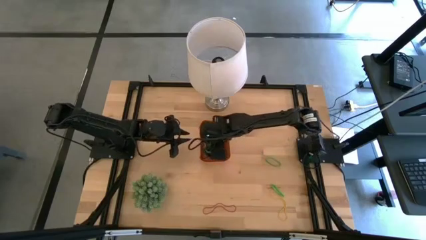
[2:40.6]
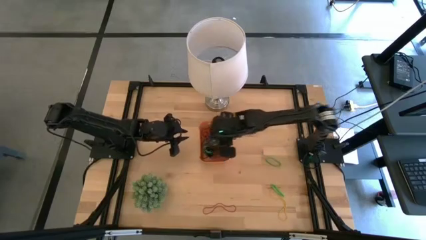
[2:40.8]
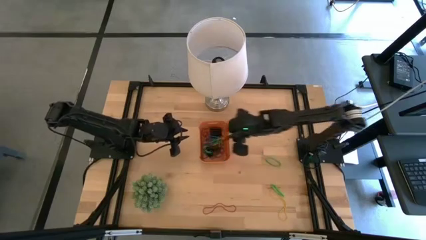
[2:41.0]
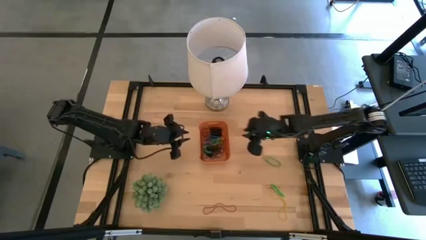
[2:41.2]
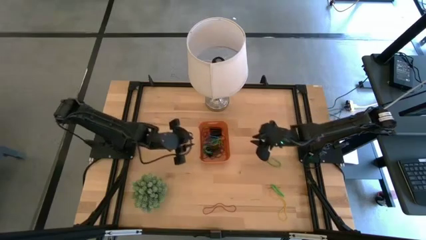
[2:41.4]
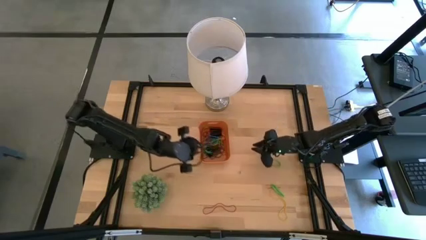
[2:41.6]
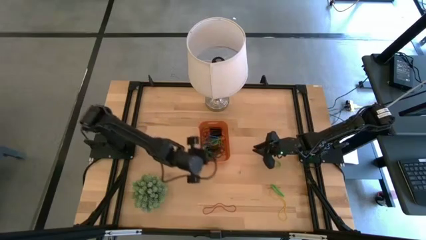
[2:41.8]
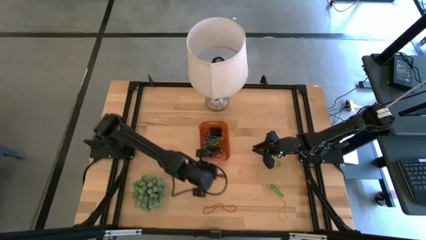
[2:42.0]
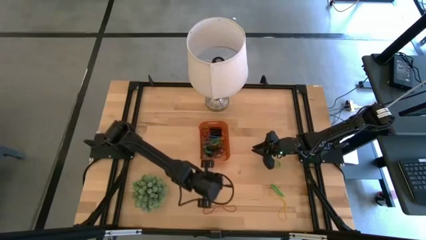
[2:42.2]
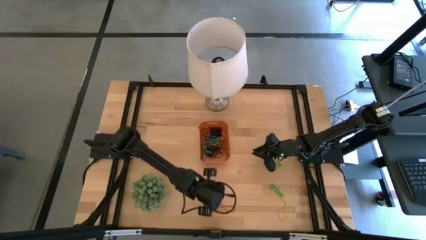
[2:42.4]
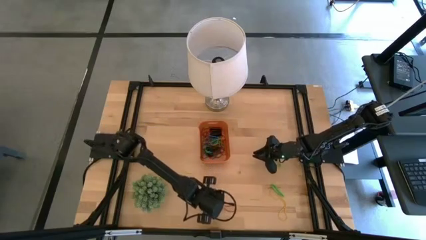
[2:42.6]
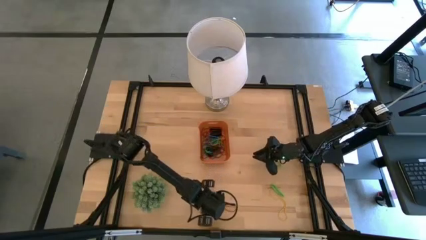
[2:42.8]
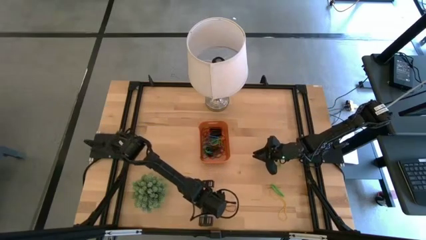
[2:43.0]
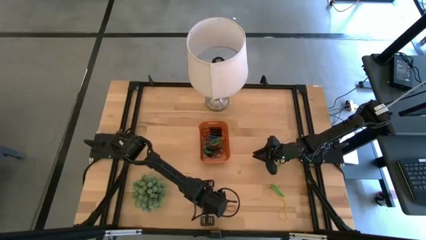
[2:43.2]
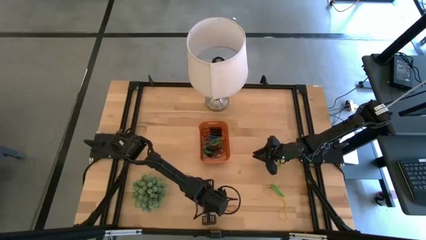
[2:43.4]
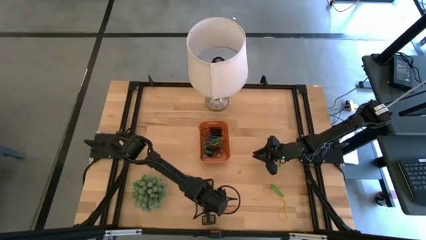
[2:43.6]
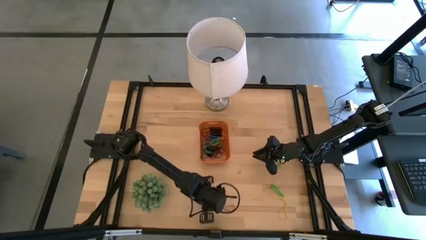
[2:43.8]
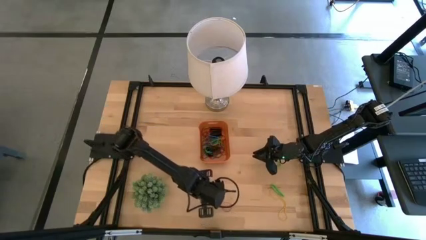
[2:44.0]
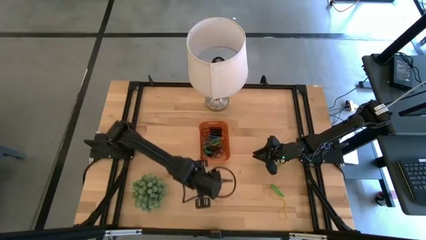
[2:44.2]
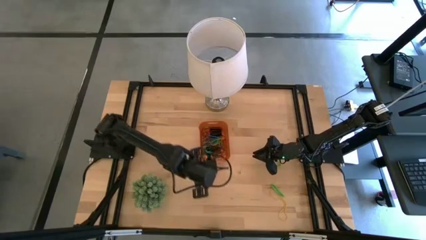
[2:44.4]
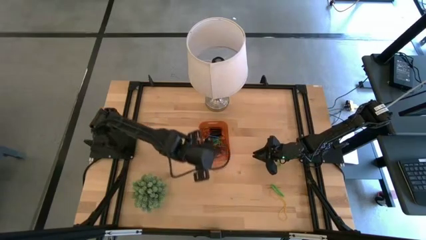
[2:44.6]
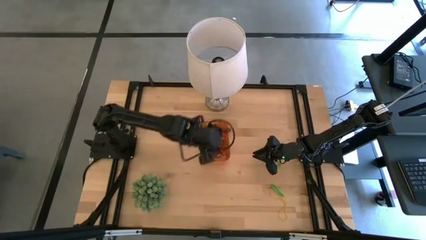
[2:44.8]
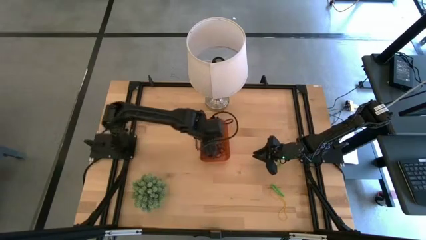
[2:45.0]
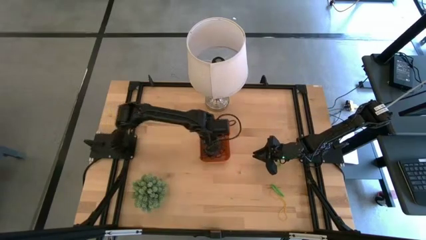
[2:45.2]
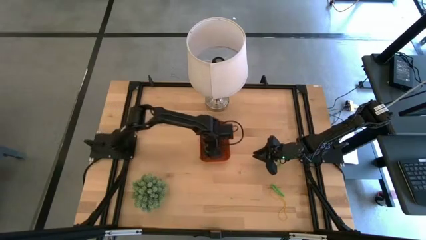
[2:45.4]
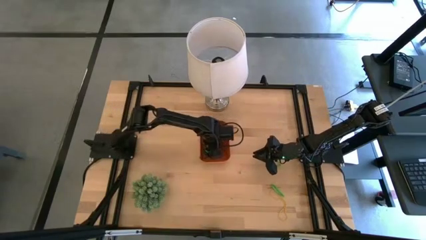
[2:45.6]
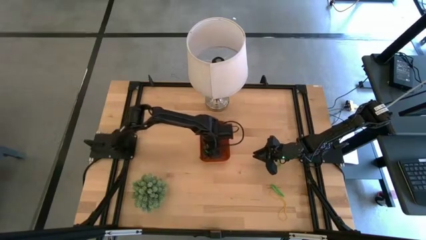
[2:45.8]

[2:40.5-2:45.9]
Task: Pick and place rubber bands into bin
Put the red rubber band into the orange bin

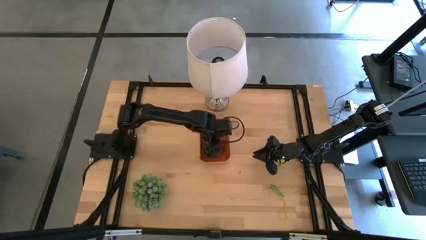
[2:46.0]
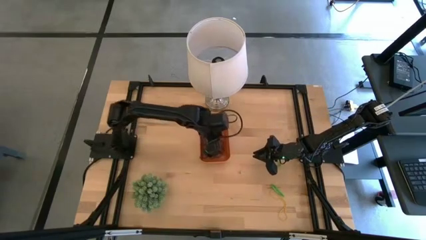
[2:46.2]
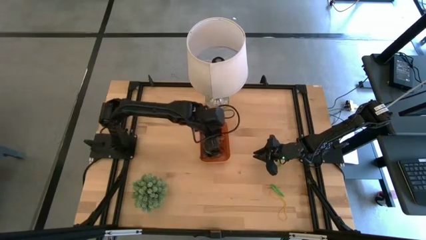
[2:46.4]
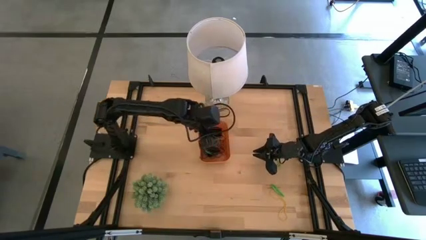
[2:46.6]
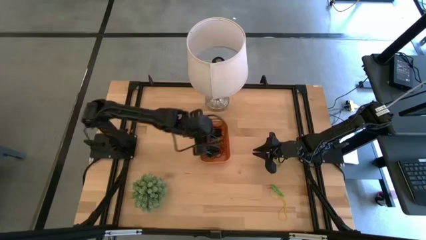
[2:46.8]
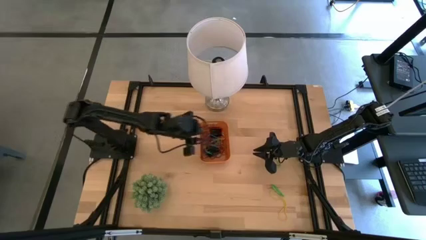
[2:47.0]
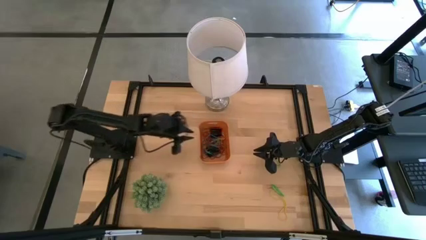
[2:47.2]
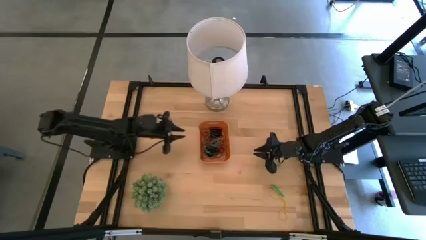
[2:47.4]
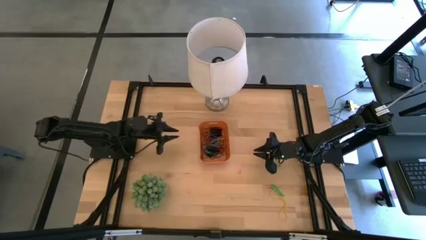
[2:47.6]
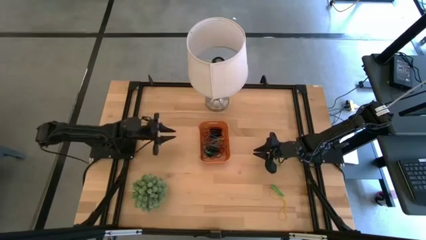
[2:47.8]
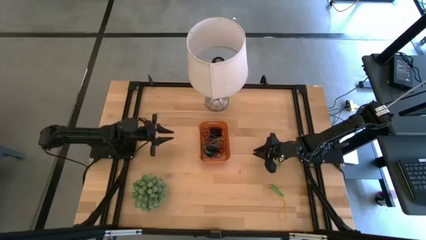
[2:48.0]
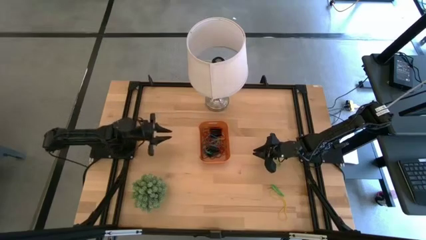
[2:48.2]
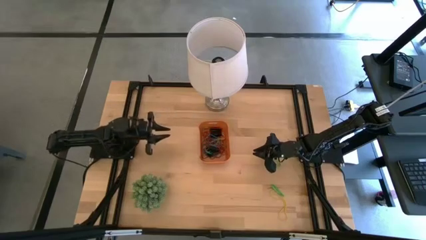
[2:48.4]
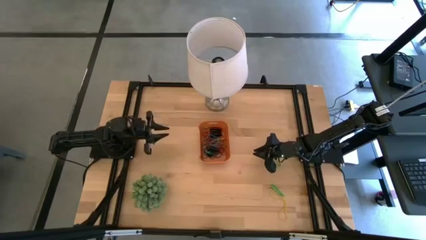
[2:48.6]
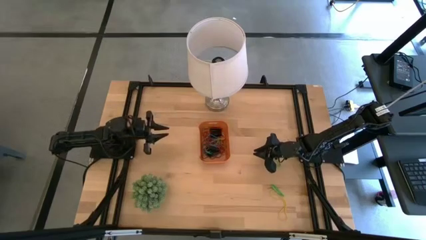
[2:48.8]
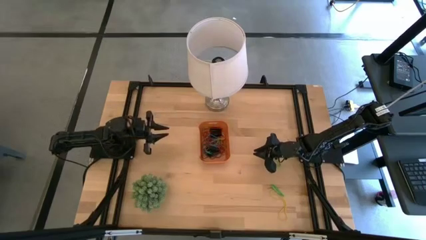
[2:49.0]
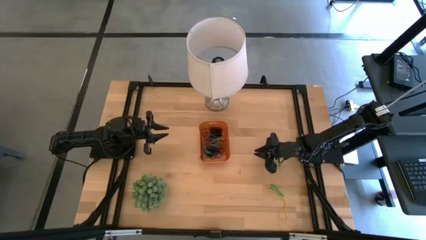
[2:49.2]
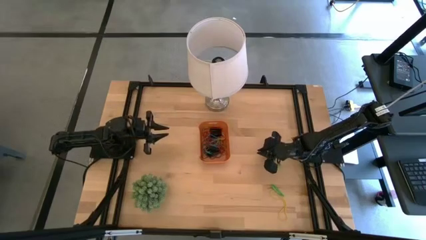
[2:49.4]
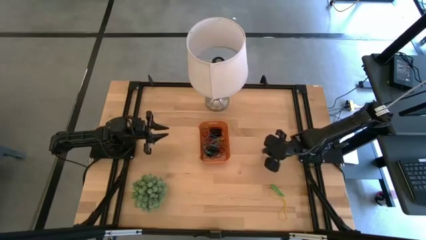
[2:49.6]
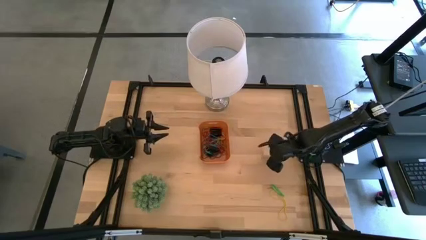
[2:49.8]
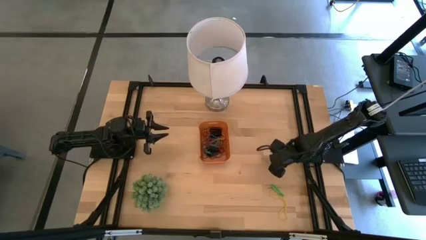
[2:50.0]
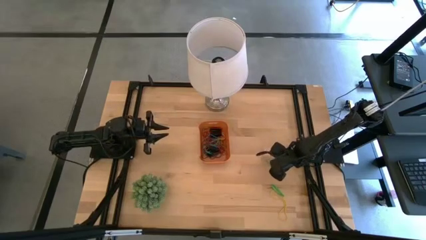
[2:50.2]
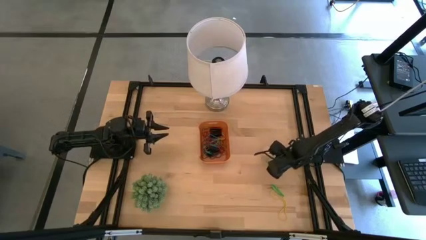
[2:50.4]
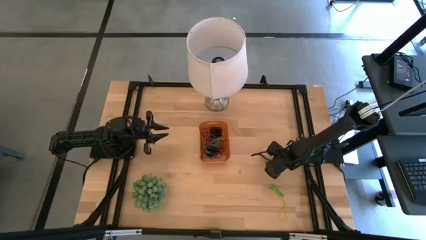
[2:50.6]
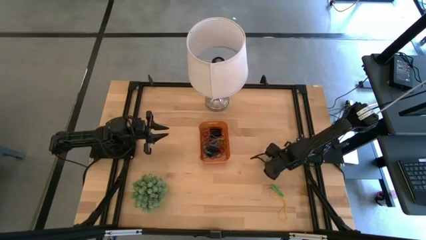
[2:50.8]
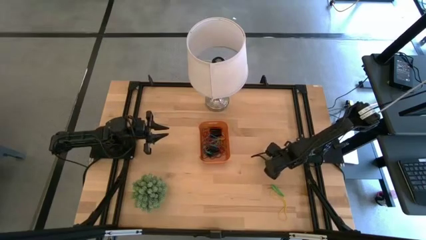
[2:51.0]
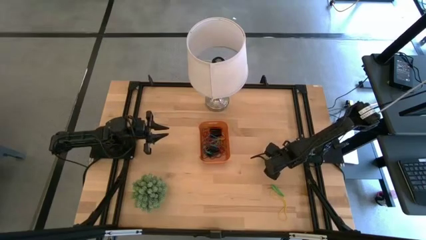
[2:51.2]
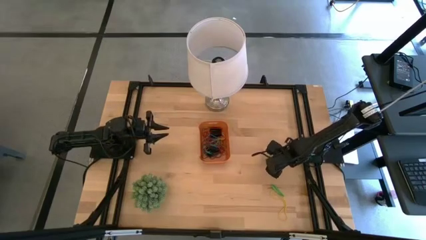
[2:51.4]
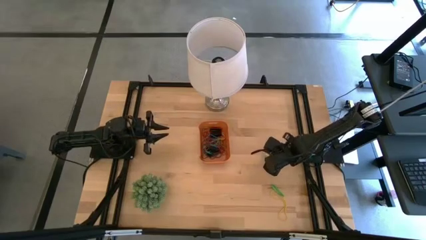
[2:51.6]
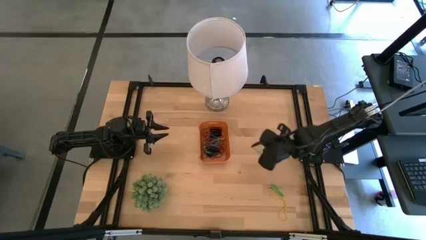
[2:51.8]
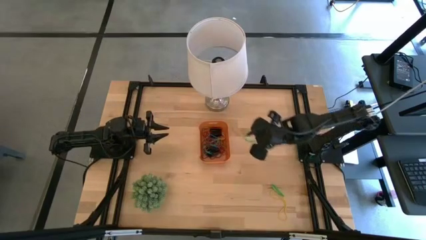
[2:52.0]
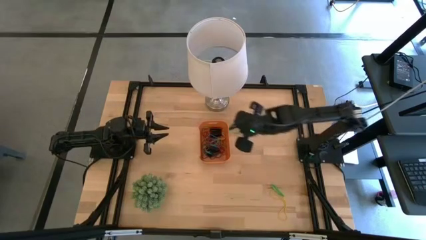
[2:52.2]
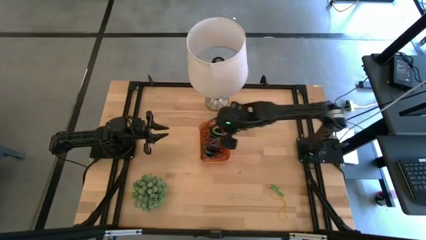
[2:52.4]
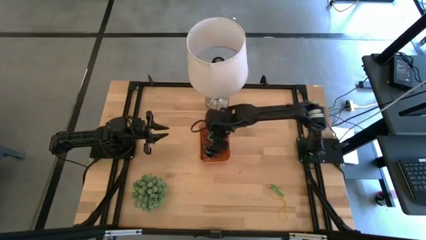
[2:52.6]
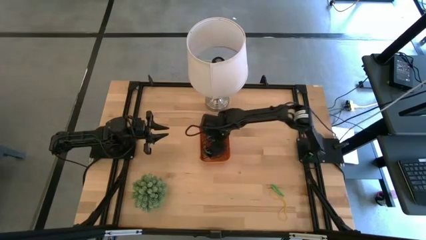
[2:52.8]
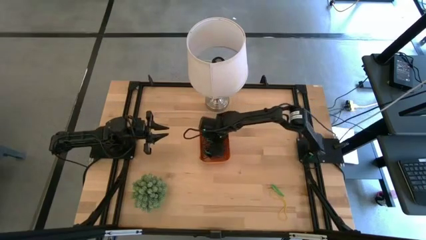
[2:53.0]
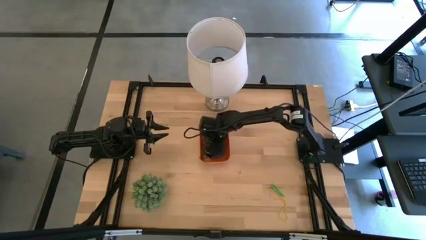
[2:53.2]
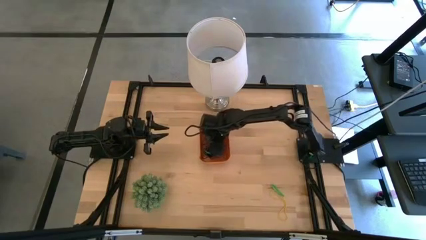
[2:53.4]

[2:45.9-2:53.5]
Put the green rubber band into the orange bin

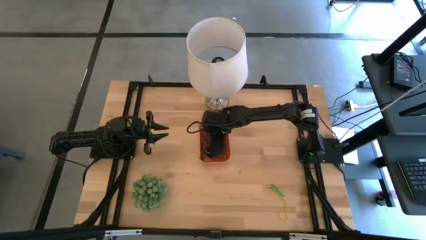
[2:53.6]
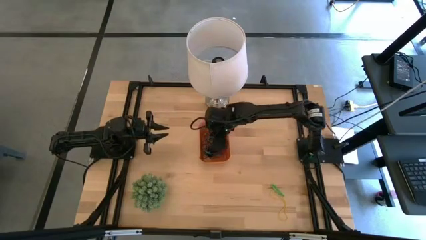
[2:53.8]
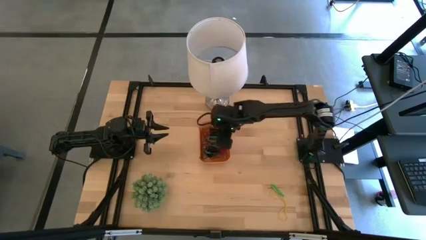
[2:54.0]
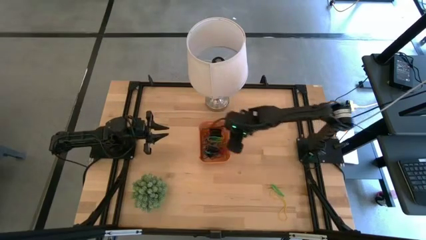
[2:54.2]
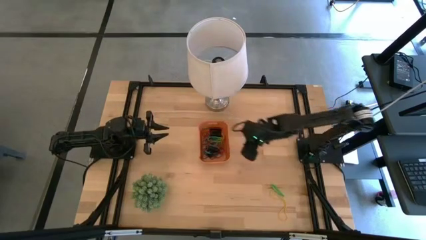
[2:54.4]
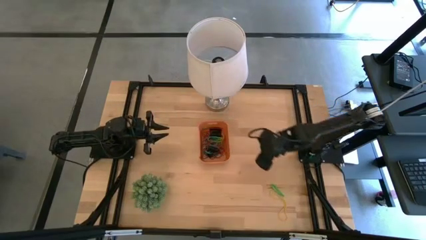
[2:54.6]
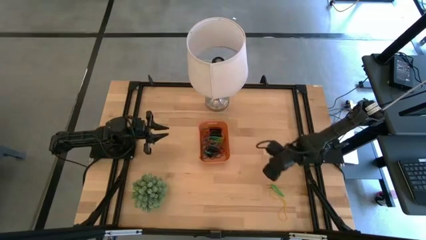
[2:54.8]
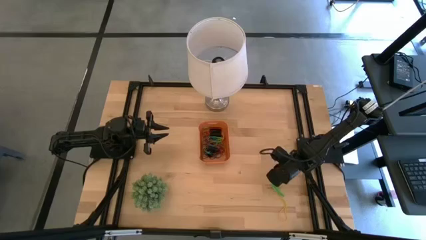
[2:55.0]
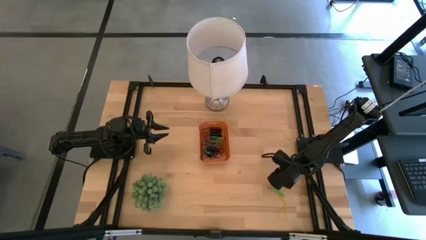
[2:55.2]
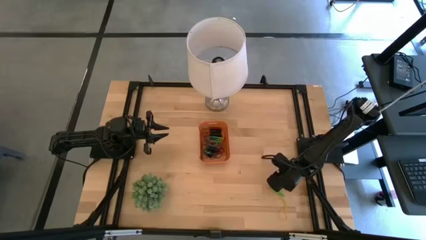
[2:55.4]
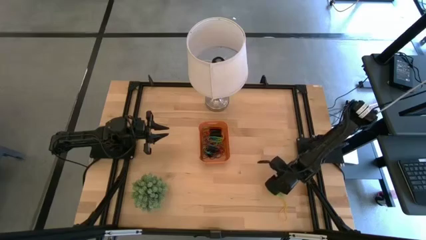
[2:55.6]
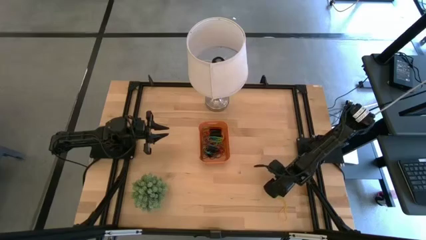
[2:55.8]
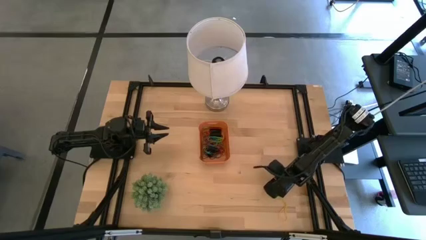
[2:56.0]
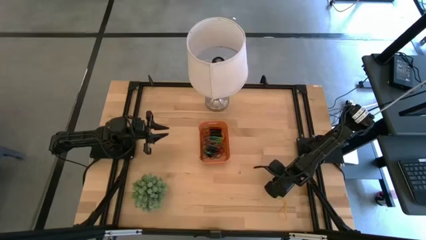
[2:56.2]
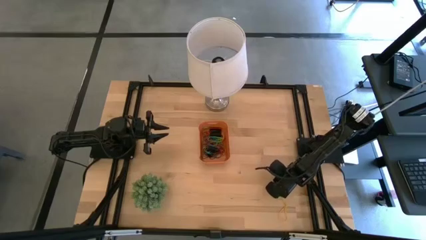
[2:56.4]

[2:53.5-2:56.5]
Put the green rubber band into the orange bin

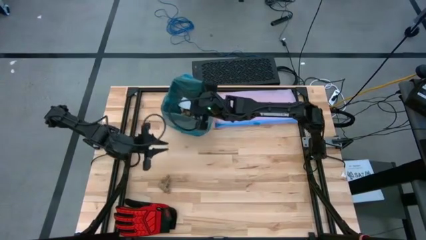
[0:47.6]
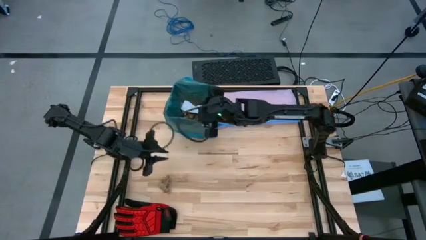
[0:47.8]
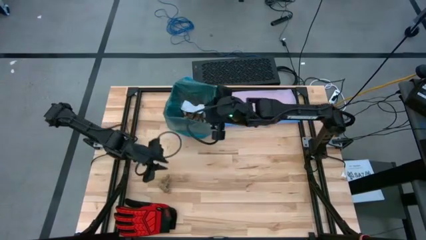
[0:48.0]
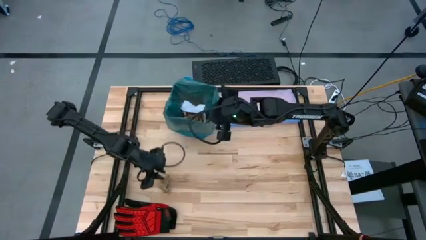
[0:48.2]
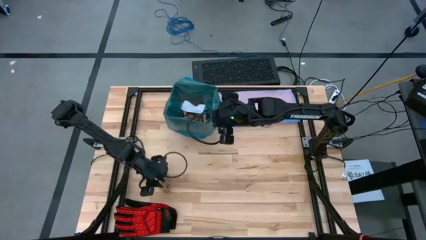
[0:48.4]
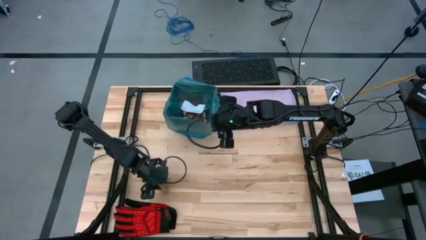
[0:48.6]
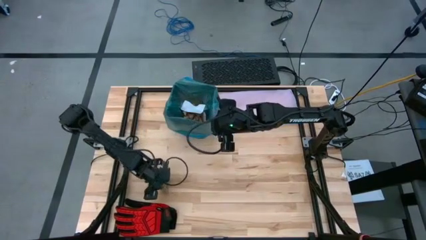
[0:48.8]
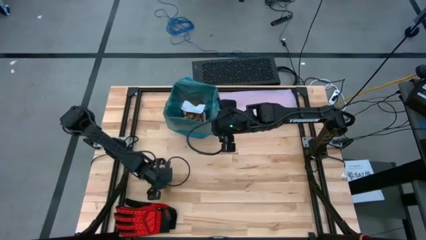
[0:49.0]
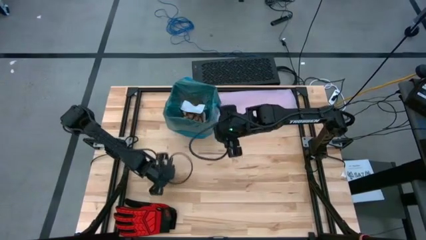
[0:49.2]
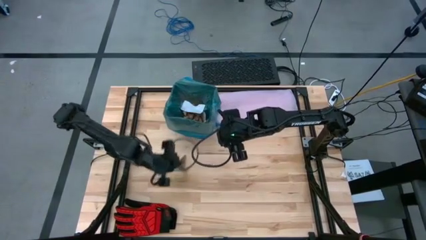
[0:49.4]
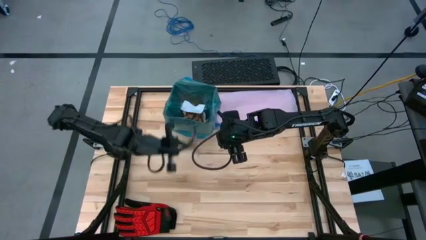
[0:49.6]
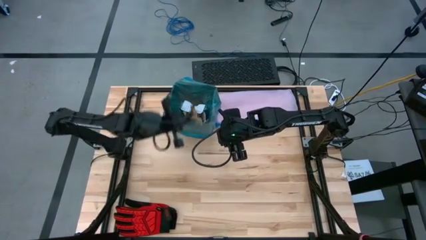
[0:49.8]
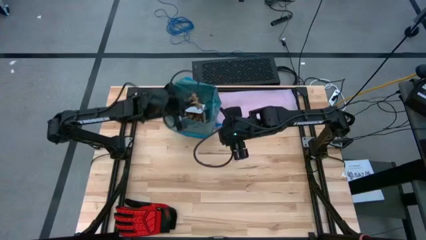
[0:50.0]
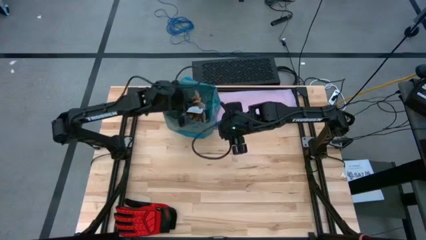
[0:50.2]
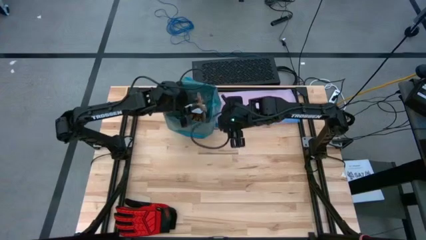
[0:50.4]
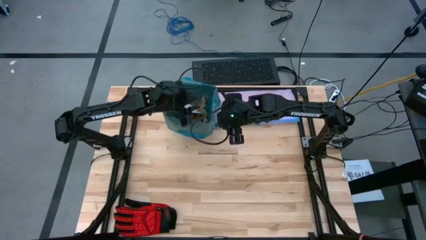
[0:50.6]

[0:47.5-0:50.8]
Task: place trash/remove bag and relplace
Put the brown napkin into the trash bin
